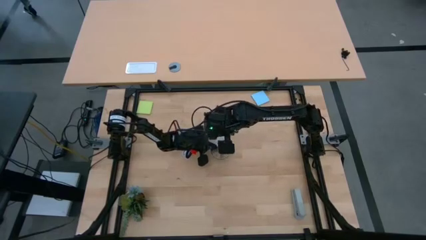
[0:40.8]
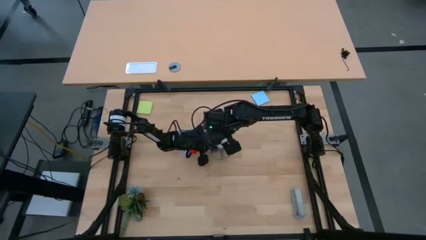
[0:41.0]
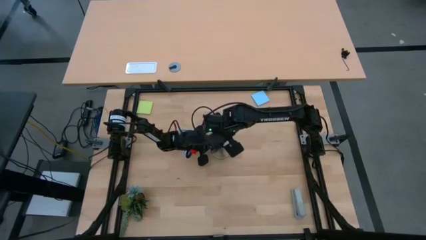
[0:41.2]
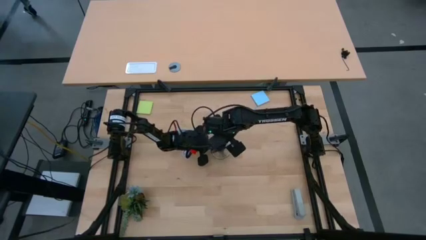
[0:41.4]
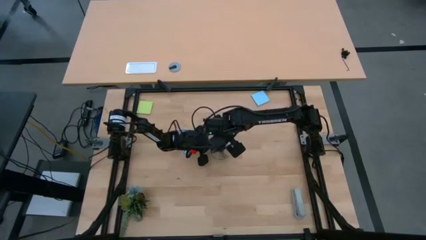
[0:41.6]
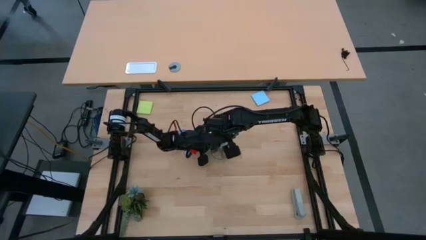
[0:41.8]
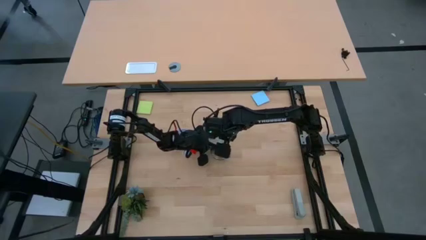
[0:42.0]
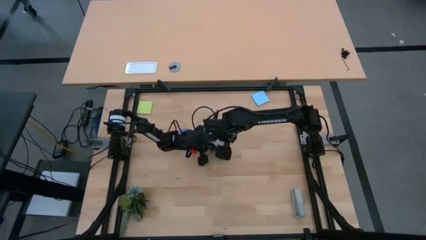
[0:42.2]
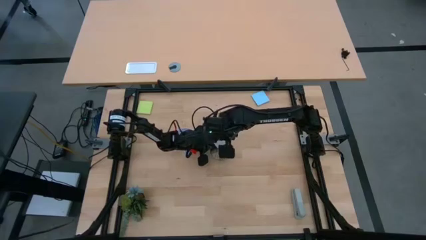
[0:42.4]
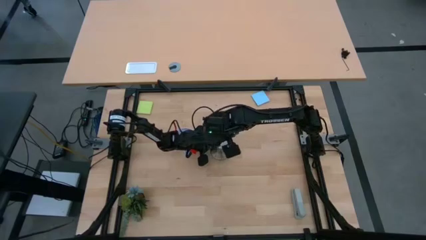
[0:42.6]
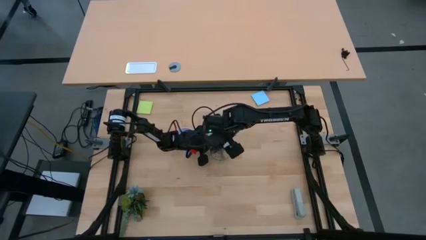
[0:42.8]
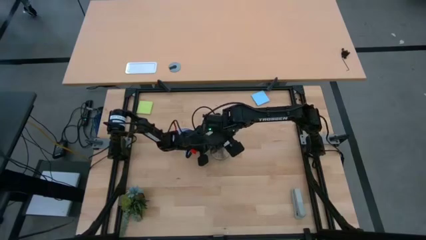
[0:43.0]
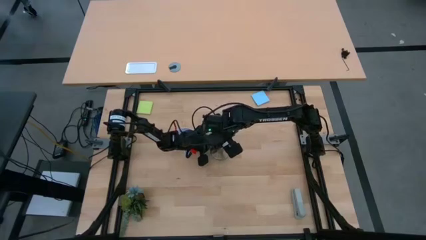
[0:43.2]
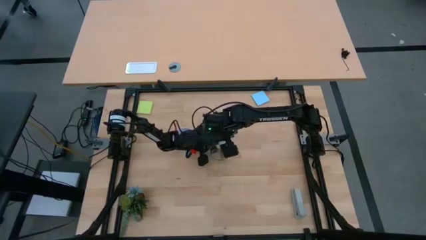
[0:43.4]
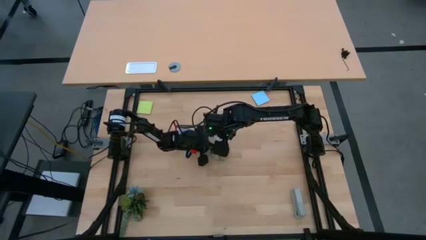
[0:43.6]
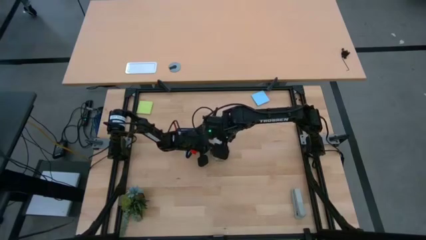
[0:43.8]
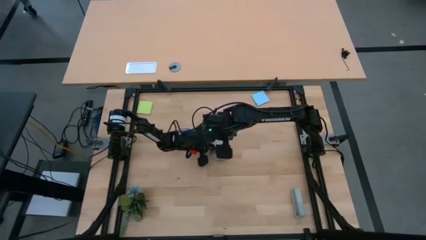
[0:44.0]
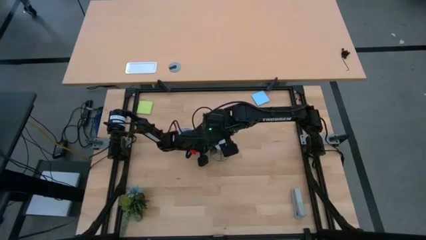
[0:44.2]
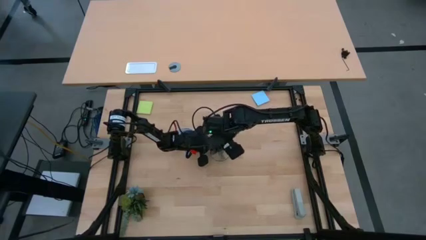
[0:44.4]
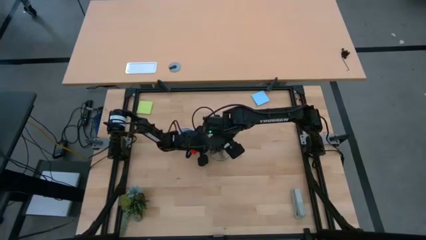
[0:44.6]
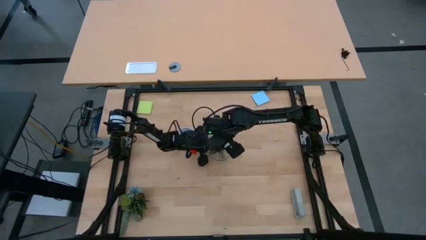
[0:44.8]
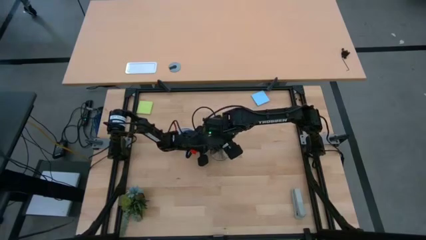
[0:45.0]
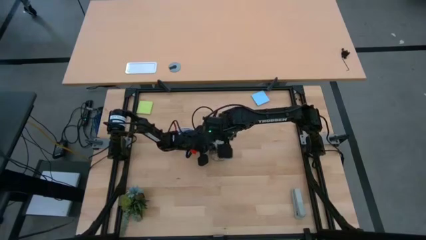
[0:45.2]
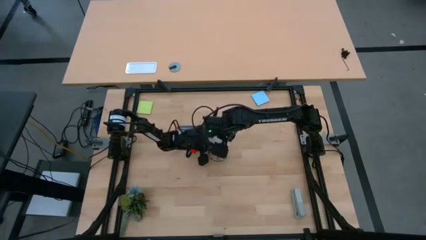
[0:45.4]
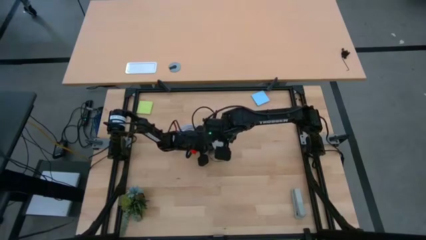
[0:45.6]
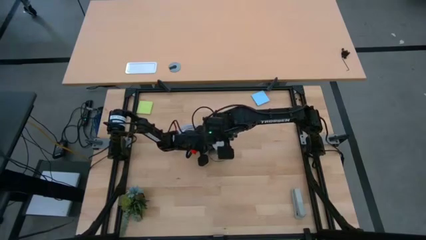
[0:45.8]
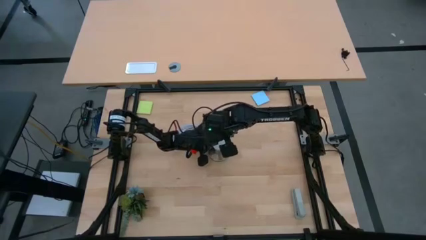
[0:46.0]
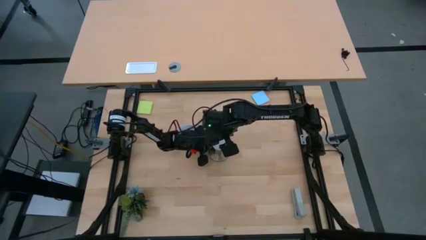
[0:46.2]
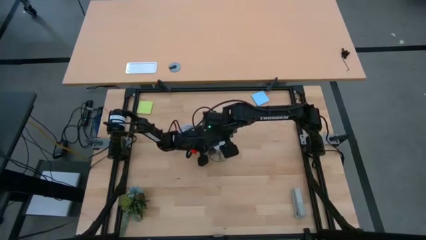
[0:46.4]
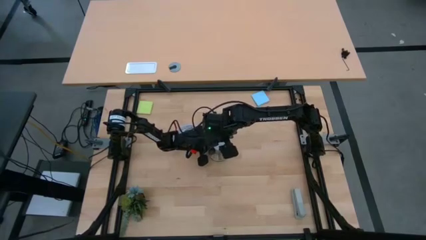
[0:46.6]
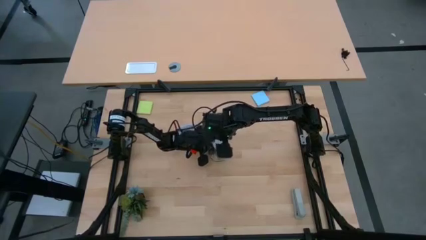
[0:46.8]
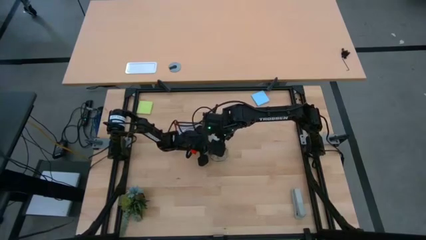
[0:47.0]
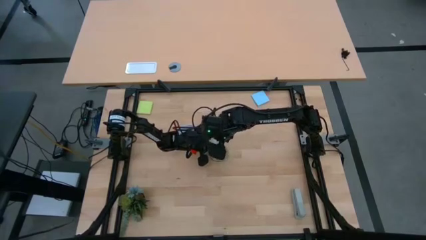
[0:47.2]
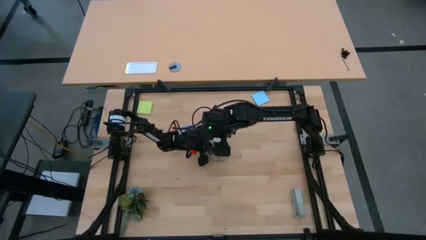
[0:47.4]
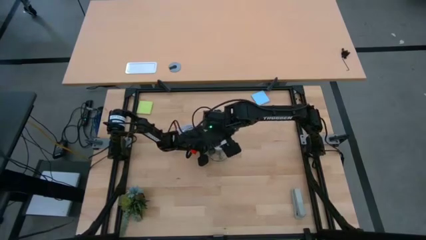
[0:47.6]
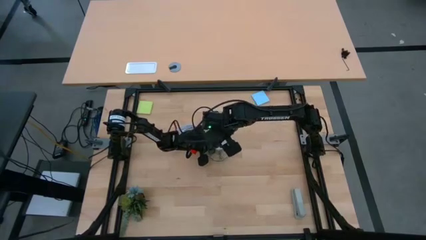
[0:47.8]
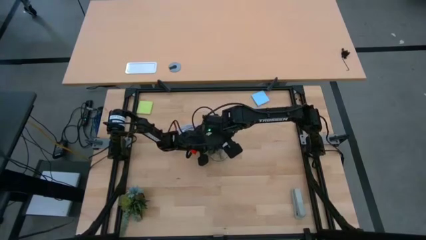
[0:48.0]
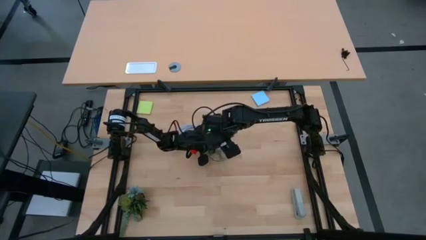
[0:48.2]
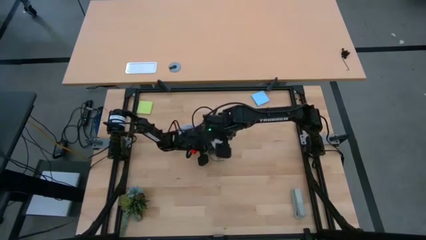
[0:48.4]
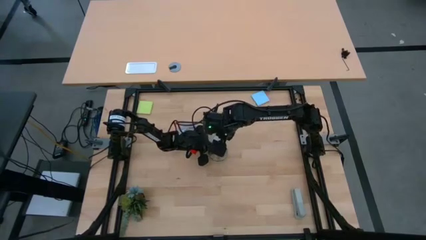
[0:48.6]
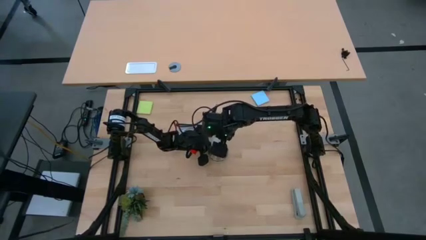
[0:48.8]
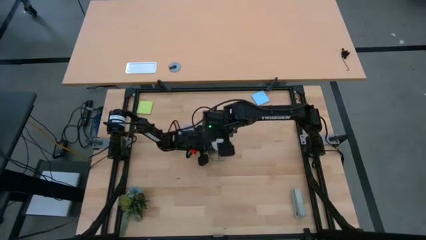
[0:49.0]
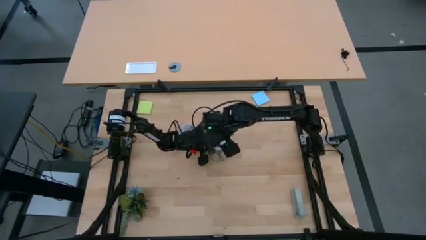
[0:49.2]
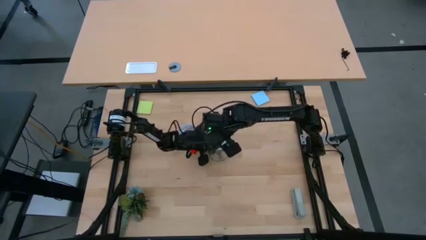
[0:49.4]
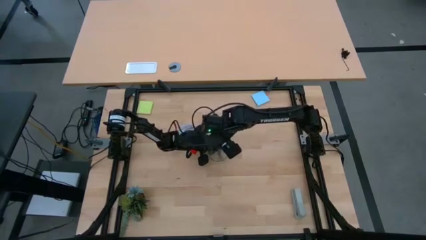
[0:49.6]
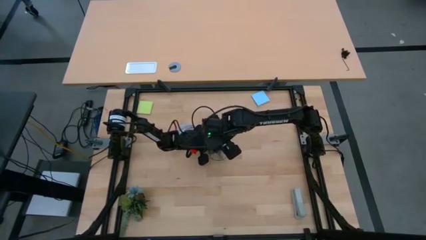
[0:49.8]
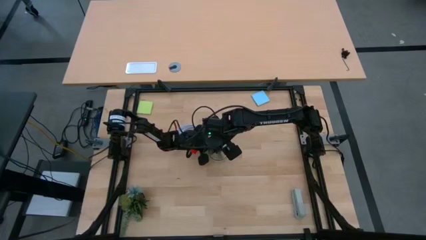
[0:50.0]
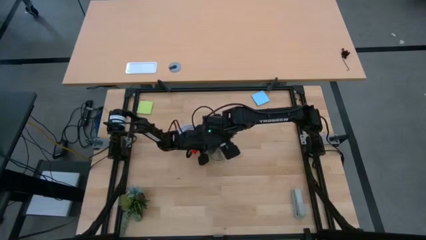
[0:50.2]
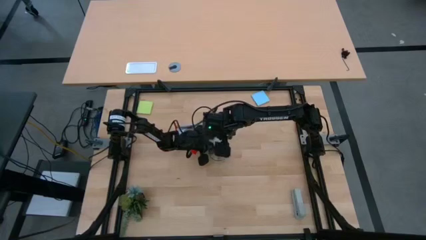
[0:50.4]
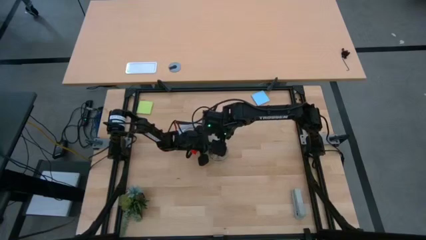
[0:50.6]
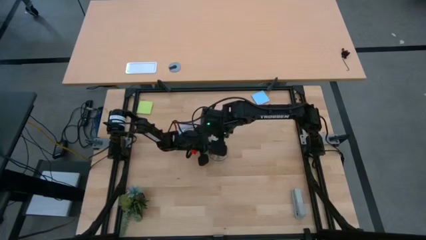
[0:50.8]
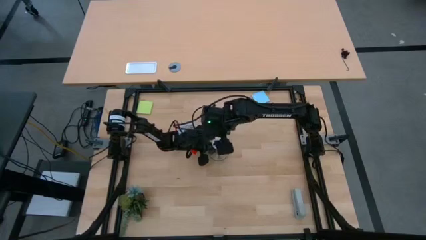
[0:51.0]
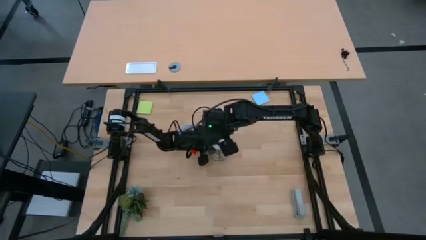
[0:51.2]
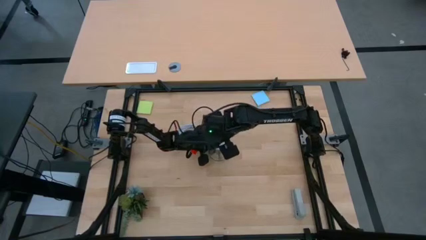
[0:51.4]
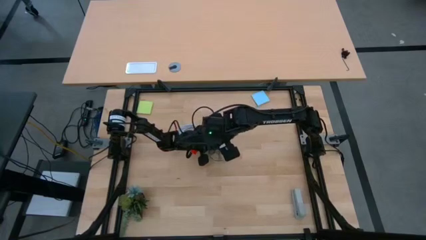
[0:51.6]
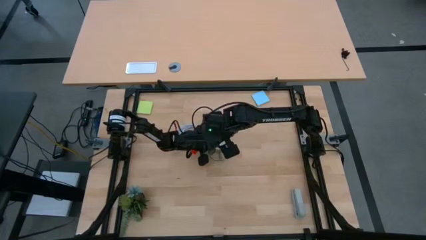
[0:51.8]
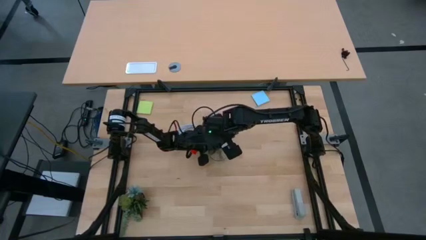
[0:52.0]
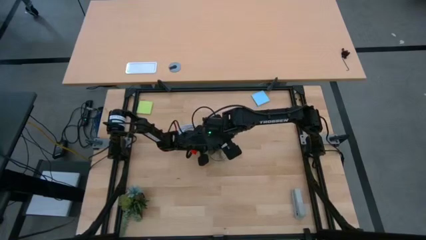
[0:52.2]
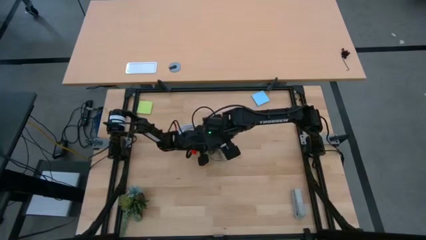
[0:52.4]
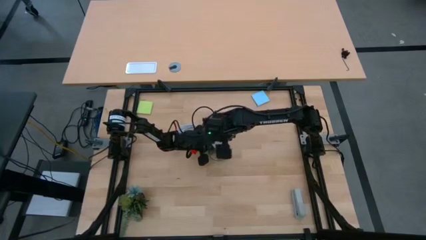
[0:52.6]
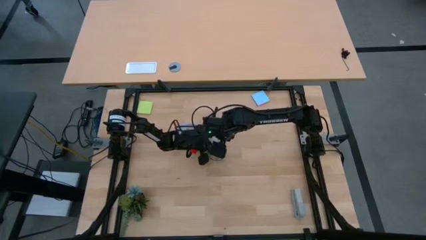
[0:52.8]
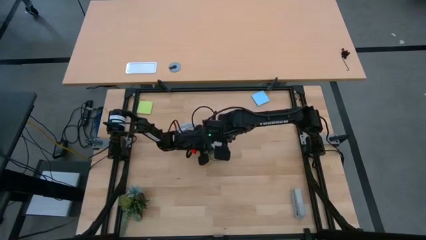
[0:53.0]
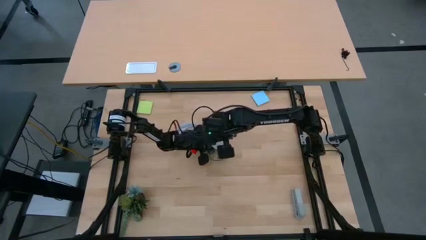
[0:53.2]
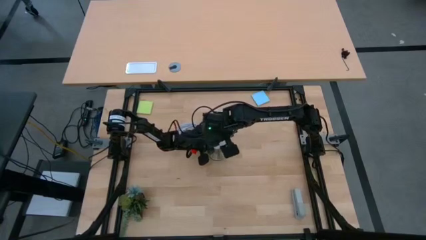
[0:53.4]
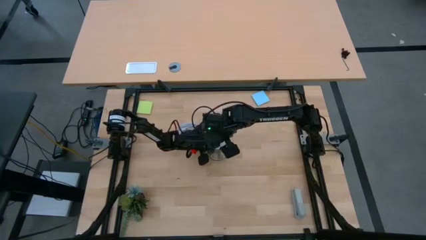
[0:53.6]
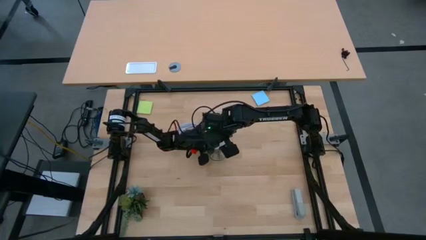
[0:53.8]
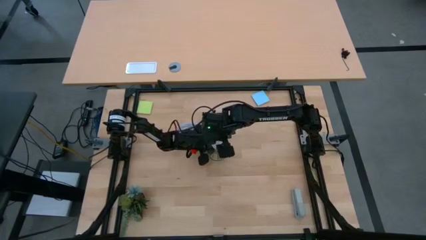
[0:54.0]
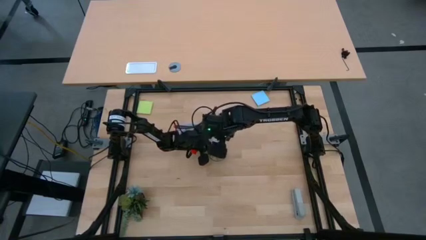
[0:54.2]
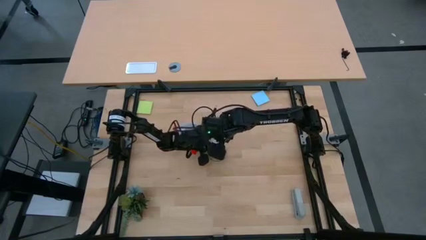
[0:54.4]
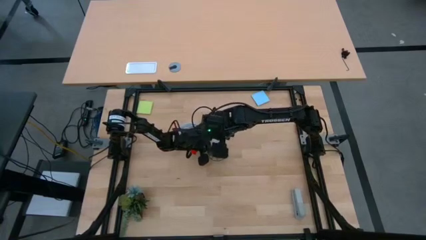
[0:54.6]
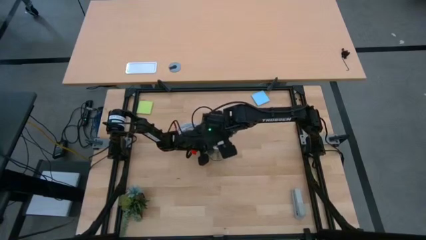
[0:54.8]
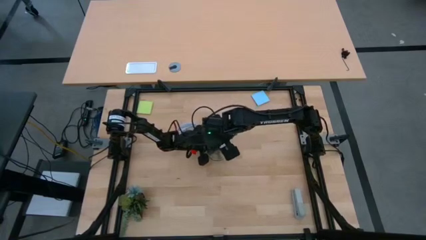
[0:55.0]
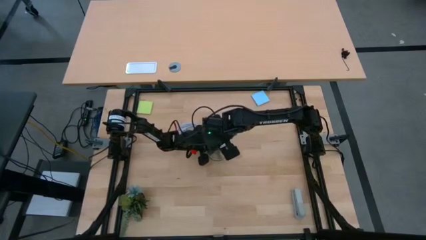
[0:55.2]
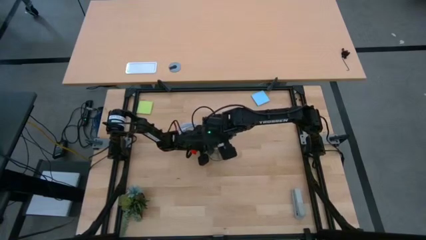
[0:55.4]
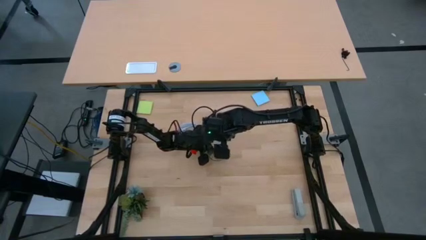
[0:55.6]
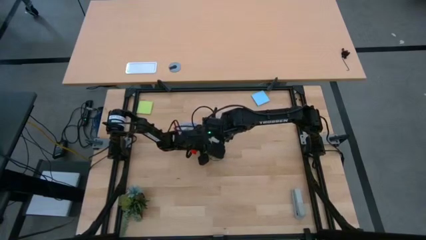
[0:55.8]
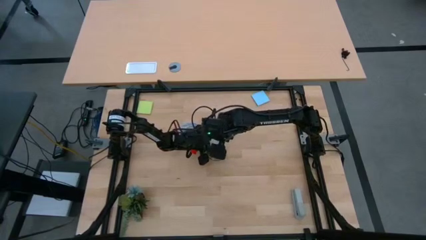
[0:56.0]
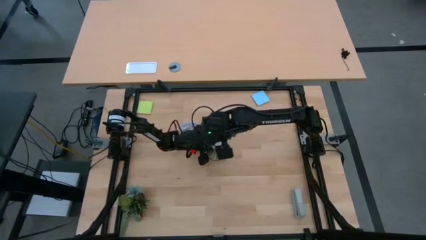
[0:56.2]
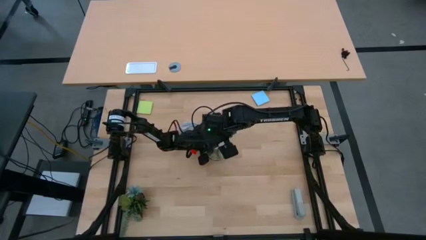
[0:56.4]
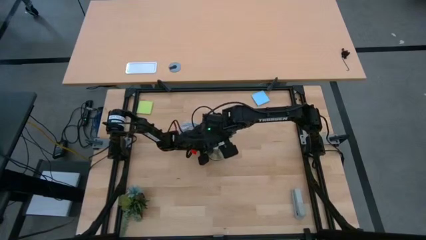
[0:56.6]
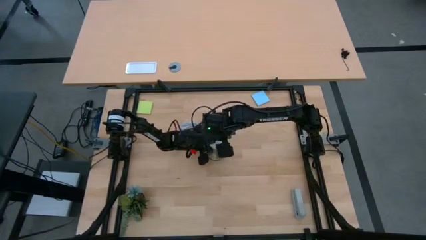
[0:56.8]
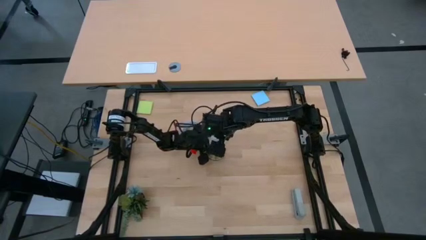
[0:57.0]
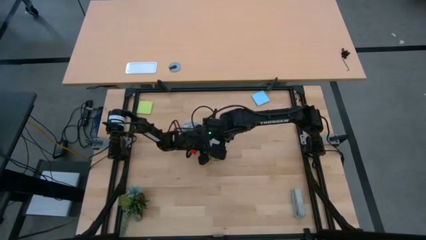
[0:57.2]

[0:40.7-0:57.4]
Task: Screw lightbulb
Insert the light bulb into the lamp
